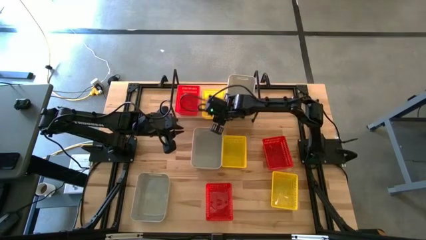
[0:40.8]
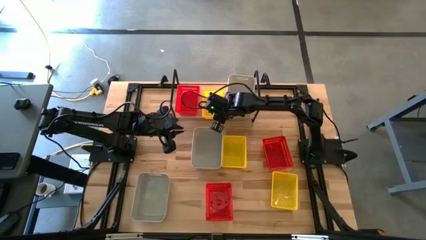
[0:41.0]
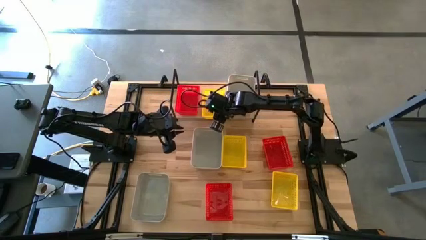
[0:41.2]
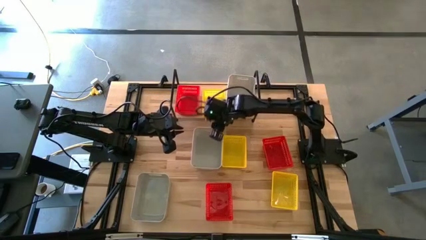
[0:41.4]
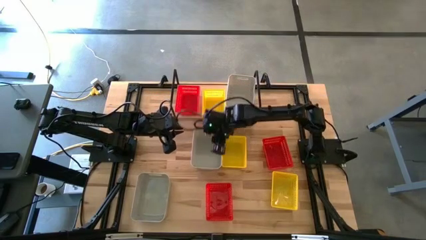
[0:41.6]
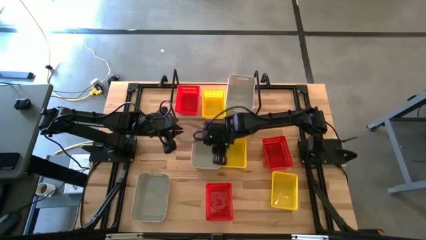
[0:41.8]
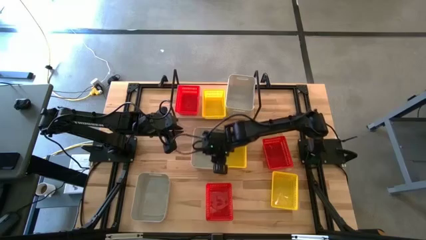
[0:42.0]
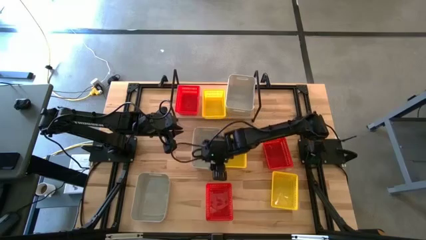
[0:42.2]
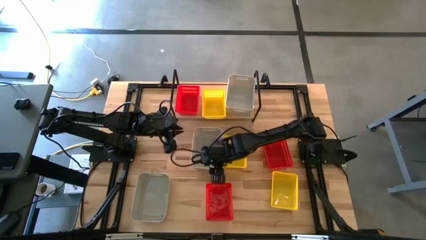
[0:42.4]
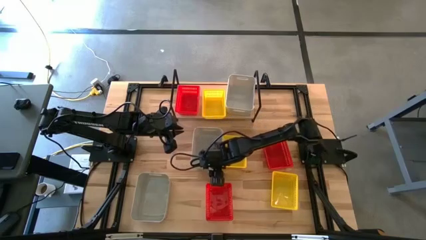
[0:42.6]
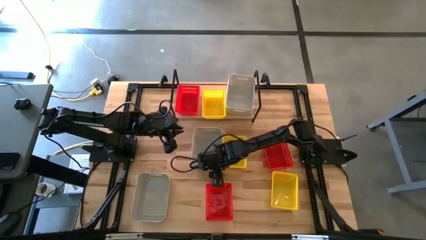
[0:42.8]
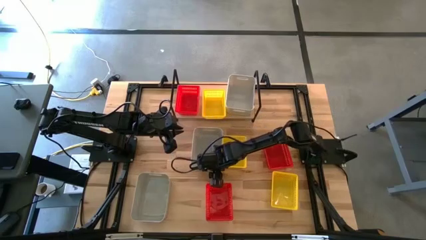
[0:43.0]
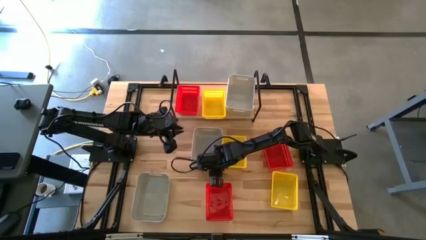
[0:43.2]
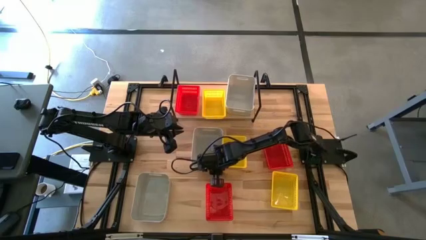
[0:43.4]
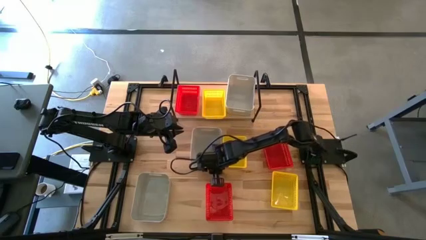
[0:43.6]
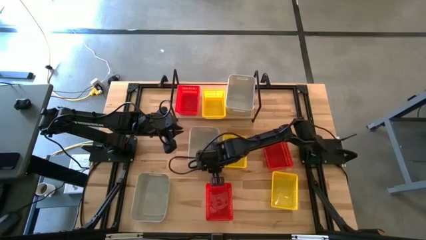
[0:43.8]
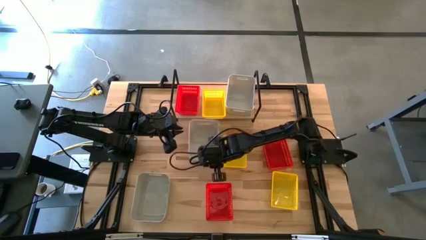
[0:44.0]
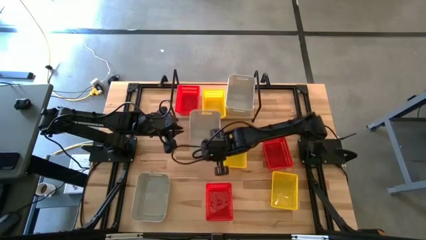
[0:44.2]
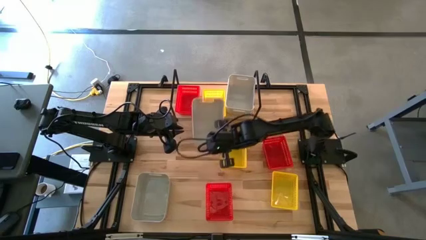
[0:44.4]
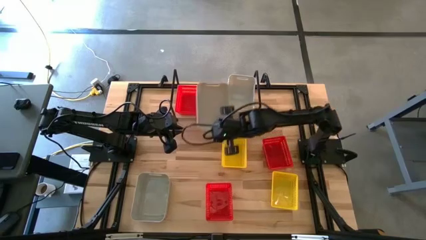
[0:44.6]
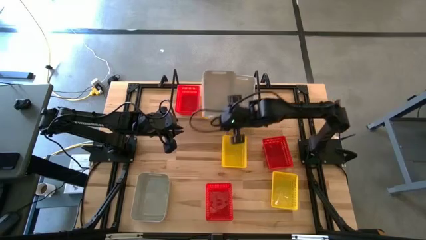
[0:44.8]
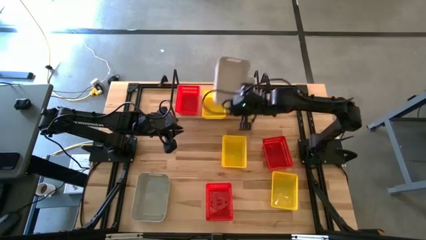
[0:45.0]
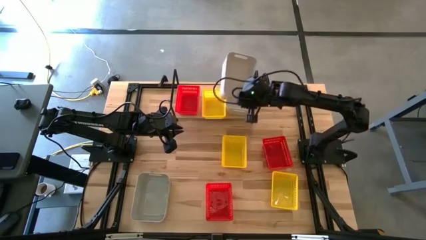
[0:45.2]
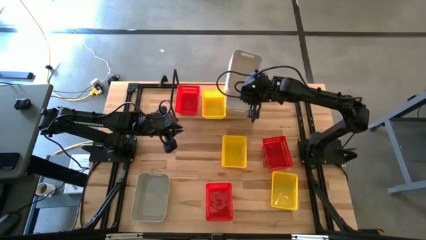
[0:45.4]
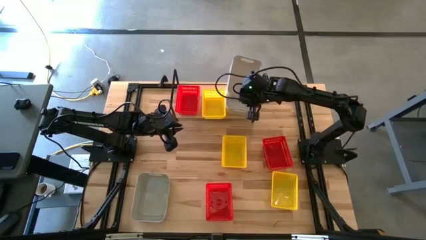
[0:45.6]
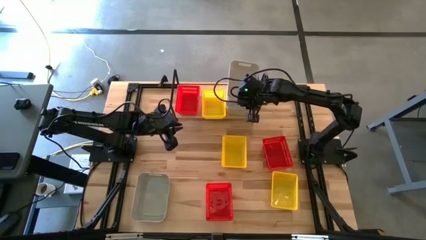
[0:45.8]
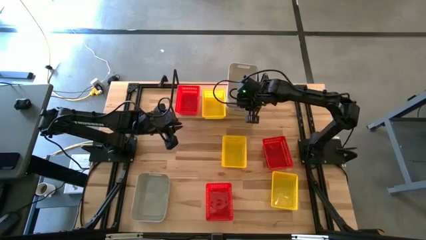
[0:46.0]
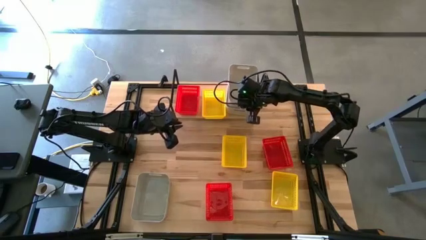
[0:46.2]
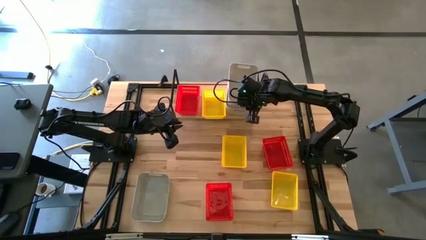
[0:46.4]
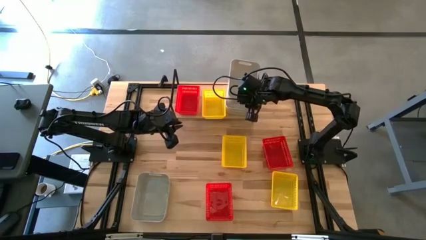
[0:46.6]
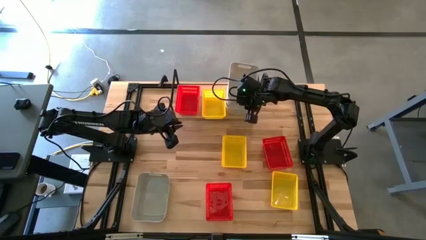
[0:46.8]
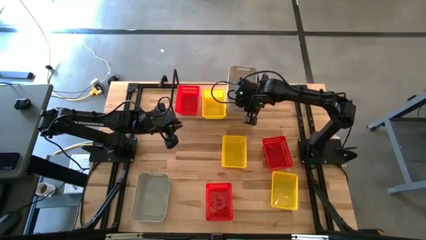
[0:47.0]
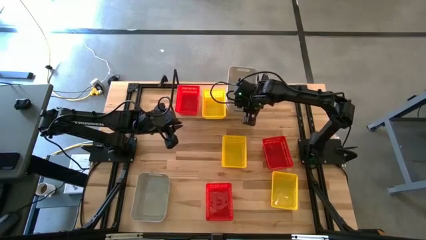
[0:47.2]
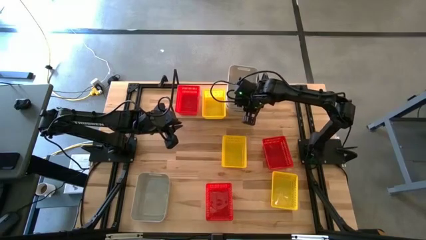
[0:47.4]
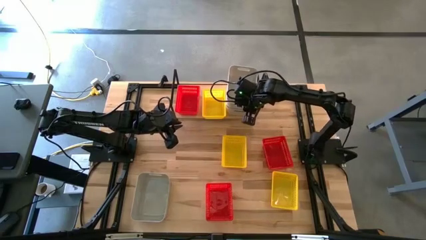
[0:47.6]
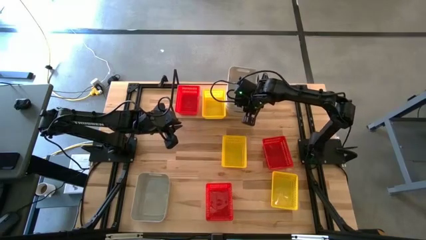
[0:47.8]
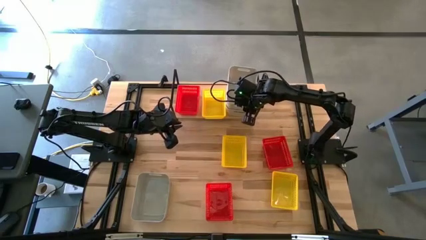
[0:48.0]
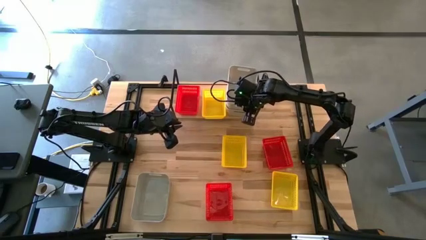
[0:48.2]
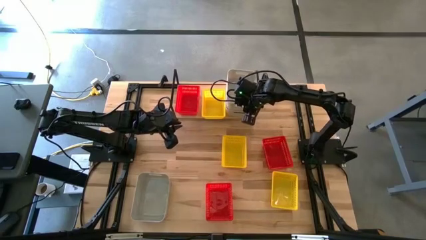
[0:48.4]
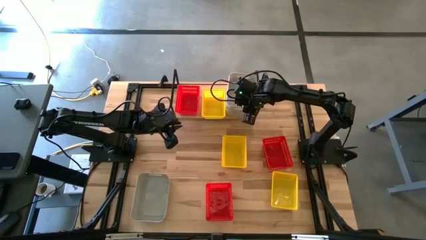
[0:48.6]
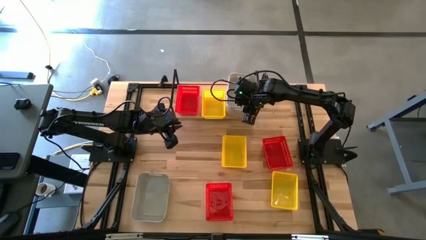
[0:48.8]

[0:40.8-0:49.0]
Task: Stack baskets on shelf by color
Stack the top gray bin on the gray bin on the shelf

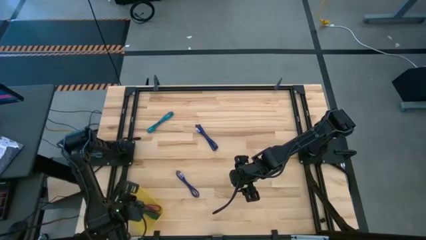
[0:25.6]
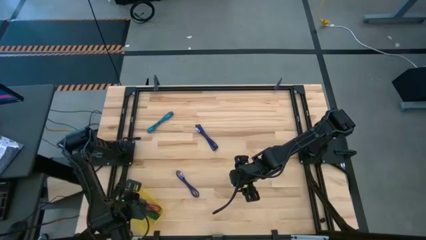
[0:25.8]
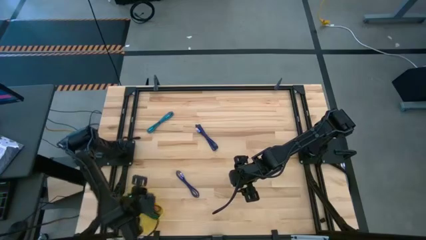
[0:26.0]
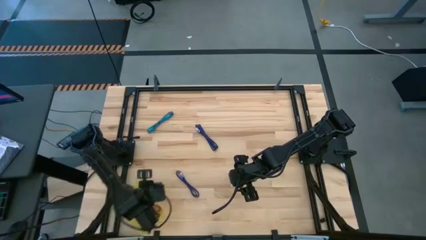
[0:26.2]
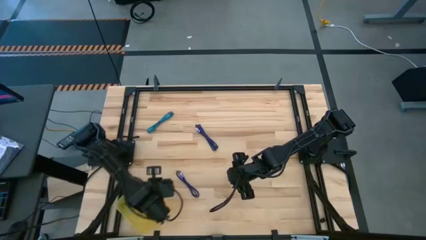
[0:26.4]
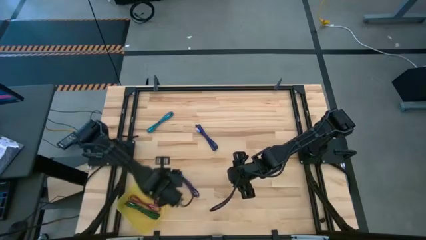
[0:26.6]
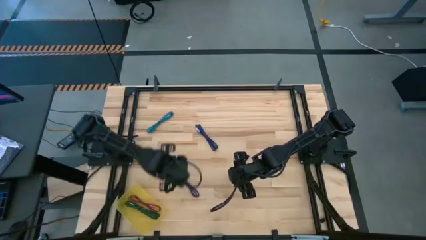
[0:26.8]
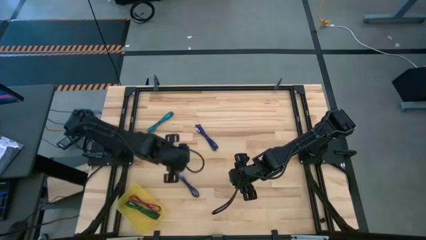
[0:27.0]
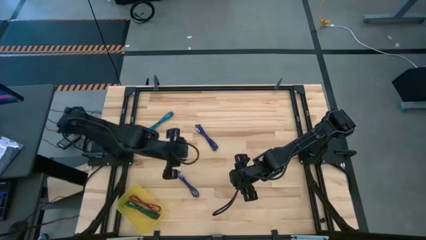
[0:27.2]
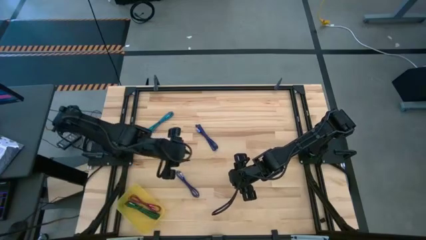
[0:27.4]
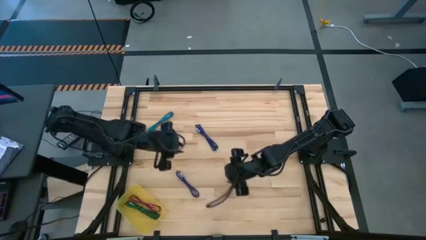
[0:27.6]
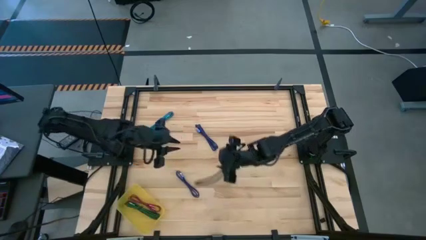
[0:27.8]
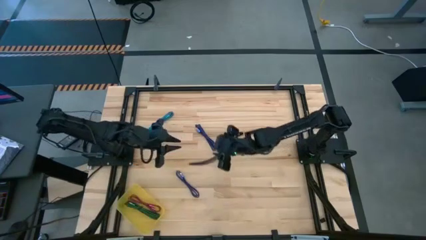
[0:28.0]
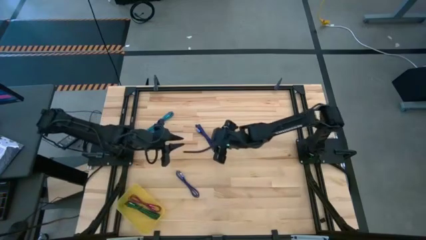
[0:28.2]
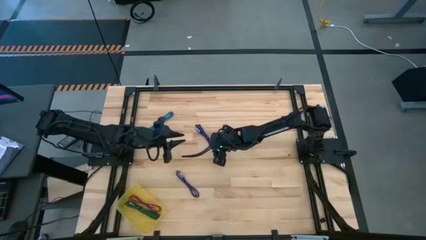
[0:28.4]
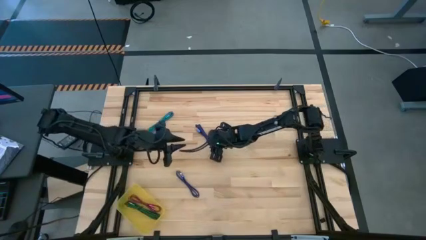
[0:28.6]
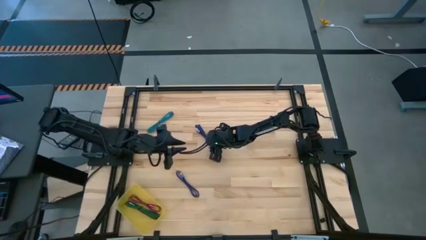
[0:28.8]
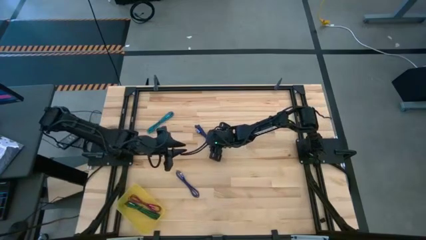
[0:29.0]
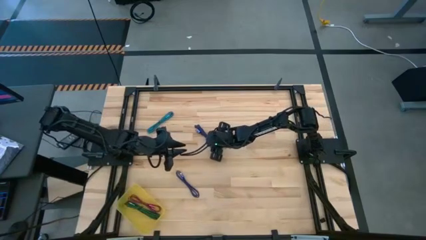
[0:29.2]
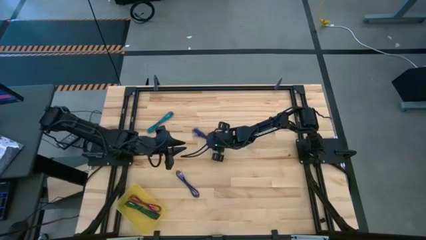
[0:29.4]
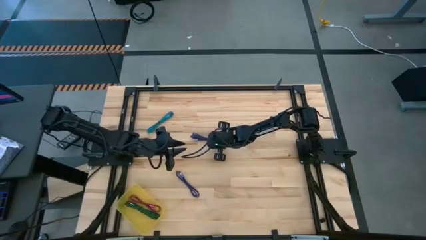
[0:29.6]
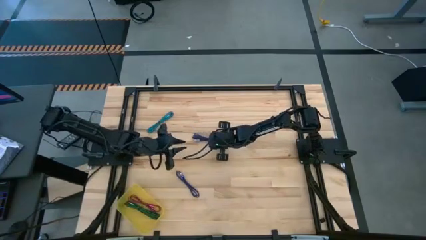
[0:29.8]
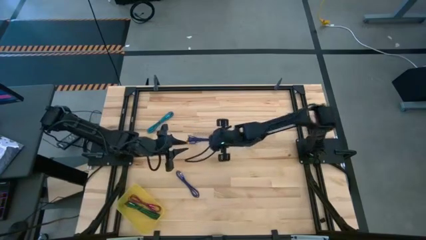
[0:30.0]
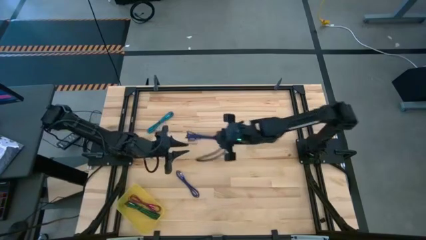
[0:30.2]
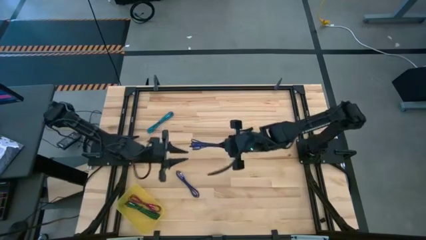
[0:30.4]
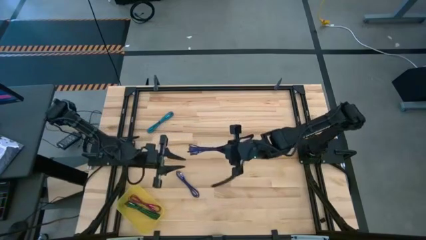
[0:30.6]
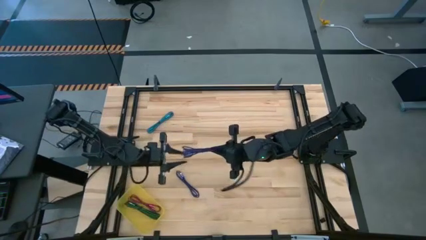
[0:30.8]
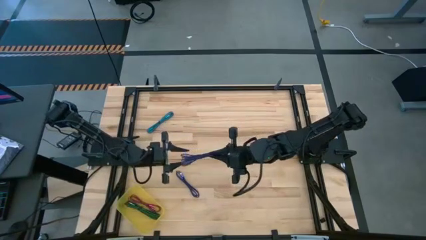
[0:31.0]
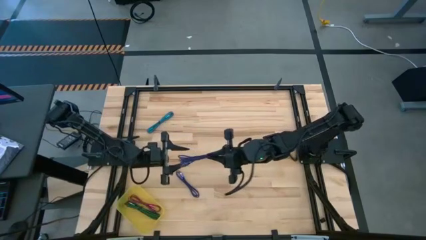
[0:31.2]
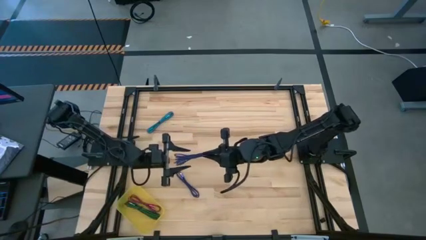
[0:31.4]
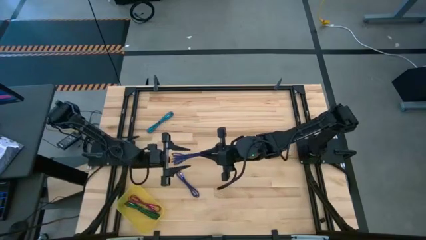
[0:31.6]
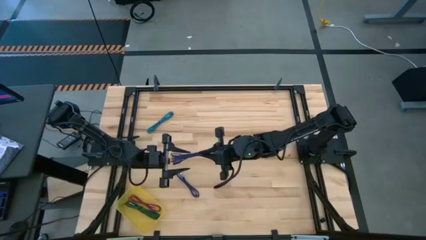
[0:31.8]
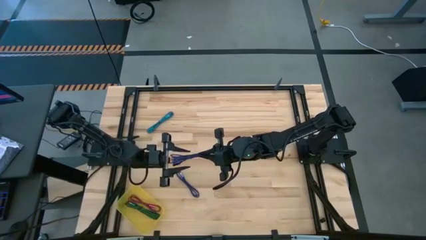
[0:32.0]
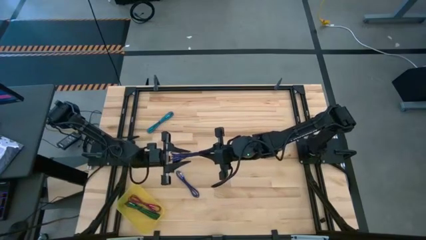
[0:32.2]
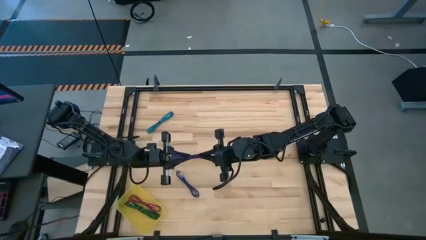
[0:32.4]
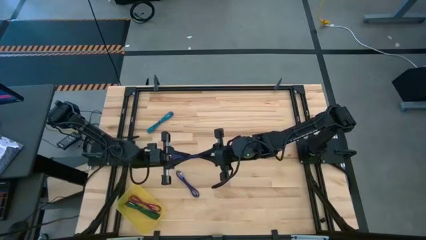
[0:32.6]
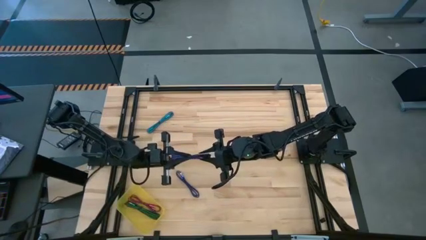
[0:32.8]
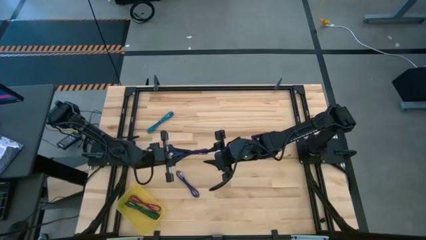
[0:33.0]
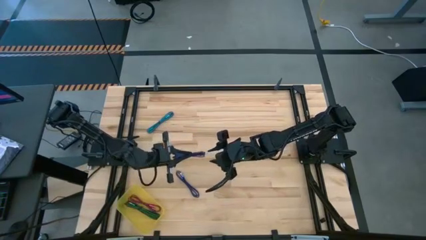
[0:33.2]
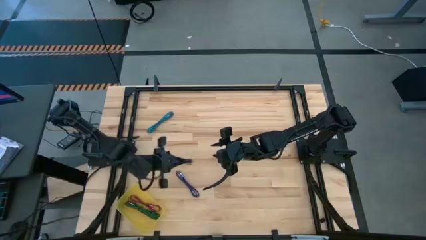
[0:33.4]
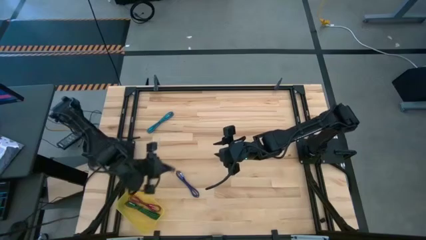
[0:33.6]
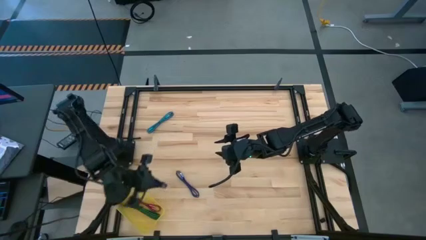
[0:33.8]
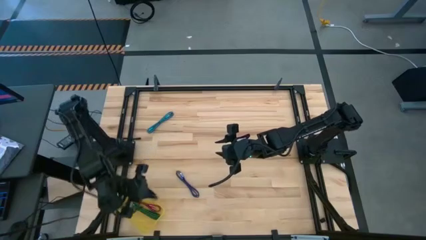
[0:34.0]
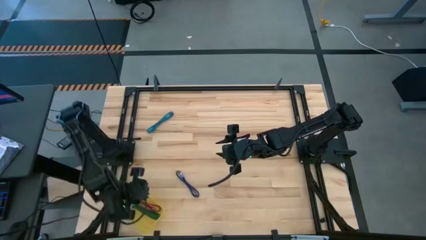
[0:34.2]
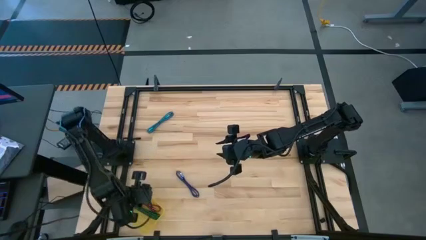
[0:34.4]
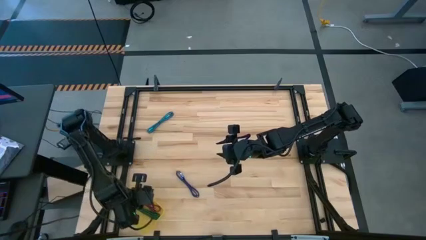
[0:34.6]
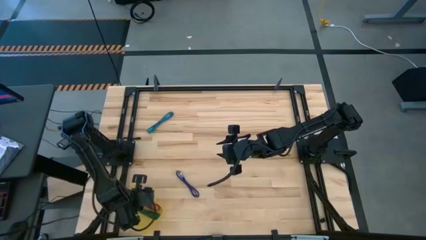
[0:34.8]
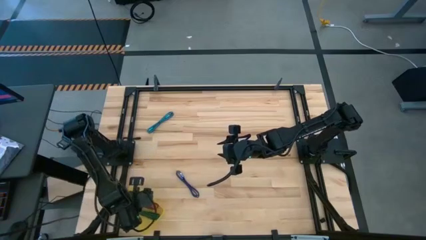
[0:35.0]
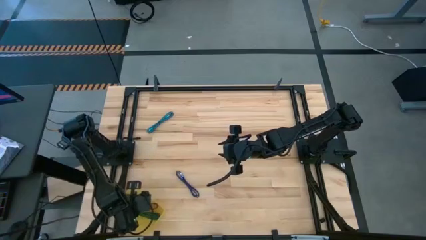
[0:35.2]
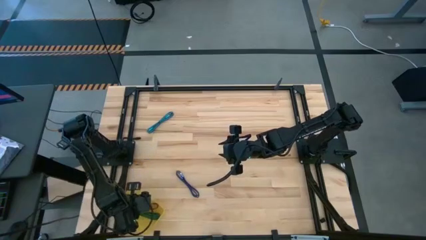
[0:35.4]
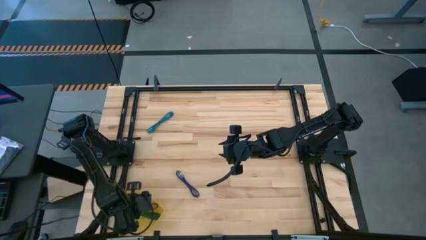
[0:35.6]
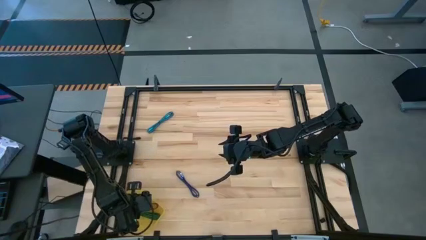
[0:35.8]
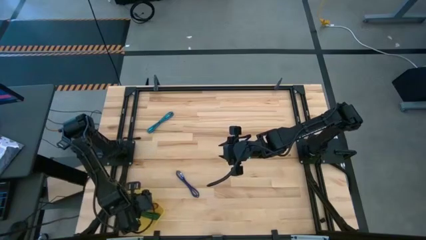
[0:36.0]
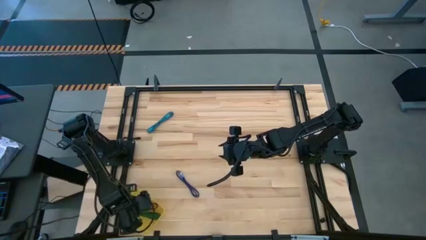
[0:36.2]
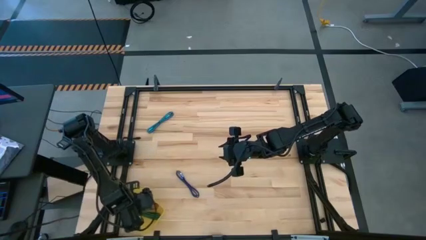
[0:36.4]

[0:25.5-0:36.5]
Task: Pick and place USB-C Cables
Put the black charger cable into the yellow bin
